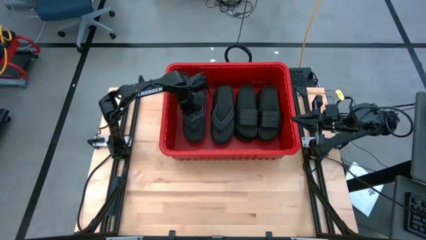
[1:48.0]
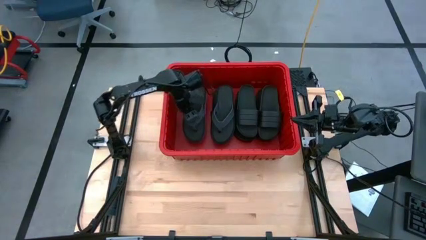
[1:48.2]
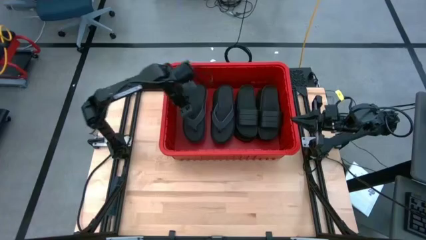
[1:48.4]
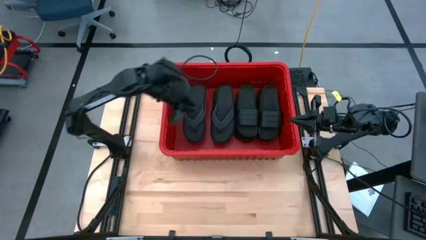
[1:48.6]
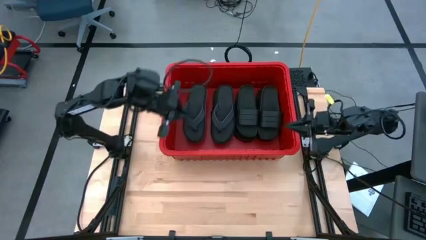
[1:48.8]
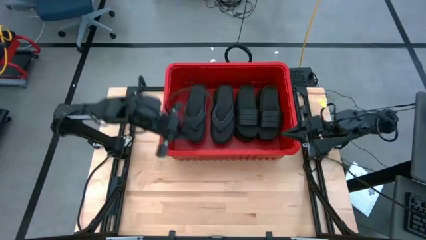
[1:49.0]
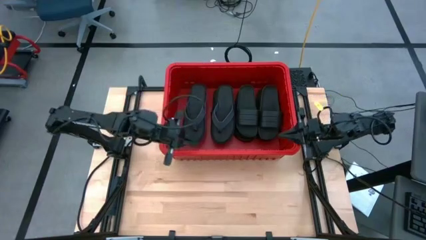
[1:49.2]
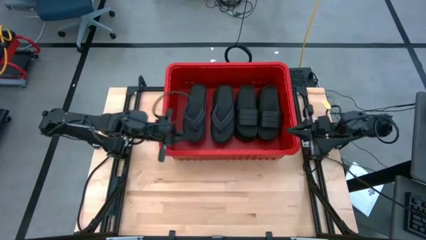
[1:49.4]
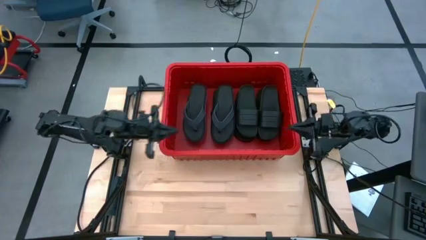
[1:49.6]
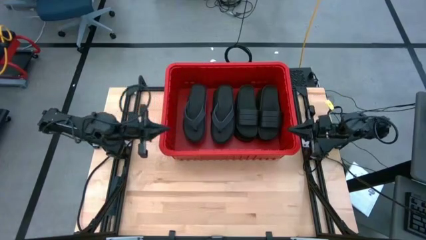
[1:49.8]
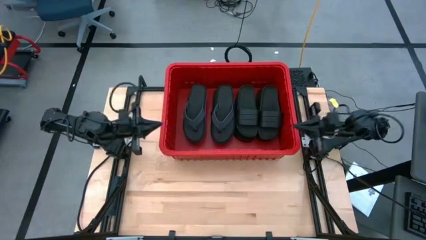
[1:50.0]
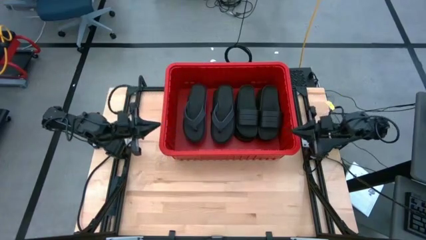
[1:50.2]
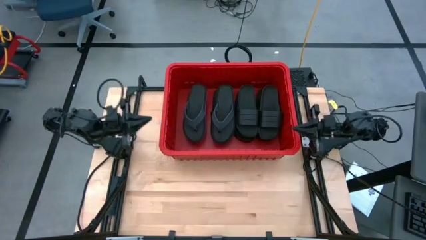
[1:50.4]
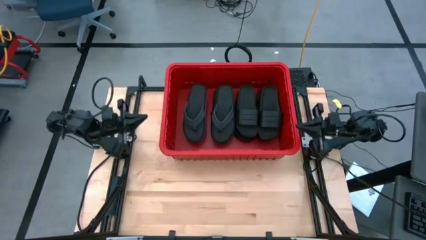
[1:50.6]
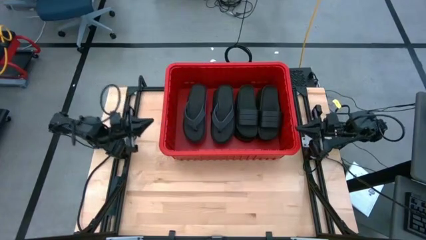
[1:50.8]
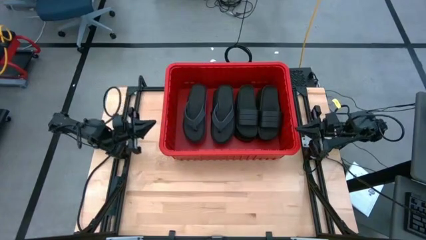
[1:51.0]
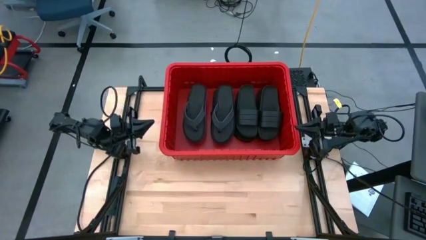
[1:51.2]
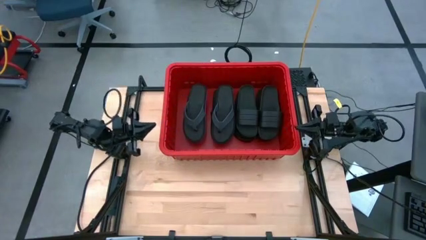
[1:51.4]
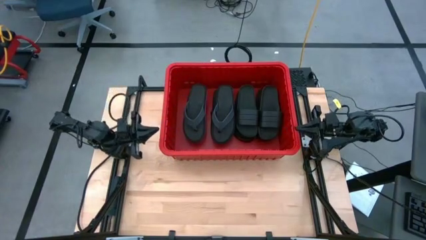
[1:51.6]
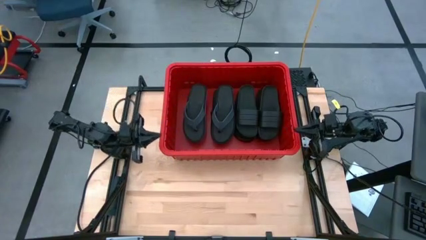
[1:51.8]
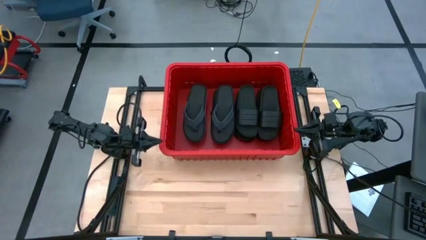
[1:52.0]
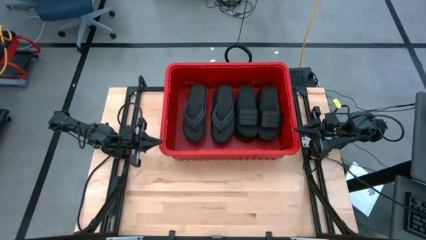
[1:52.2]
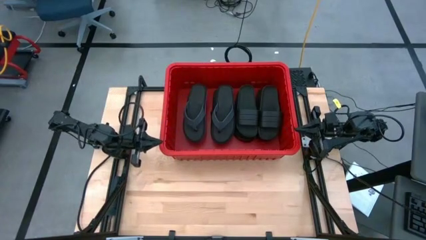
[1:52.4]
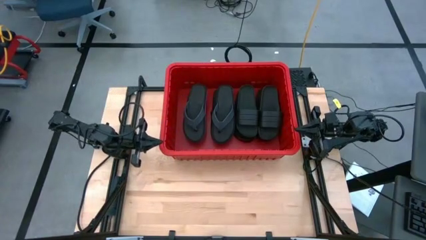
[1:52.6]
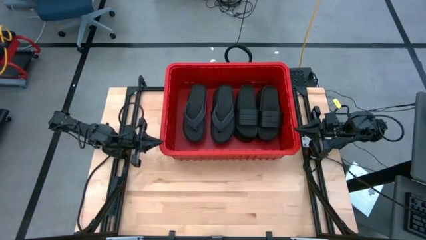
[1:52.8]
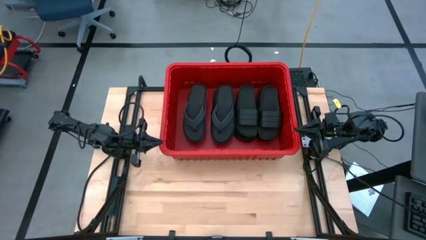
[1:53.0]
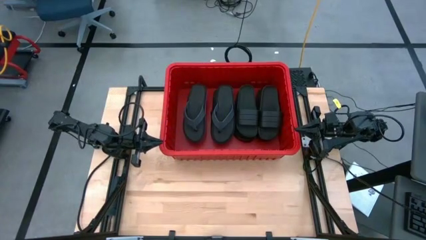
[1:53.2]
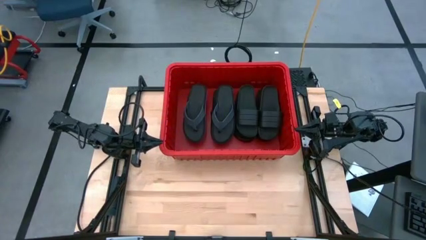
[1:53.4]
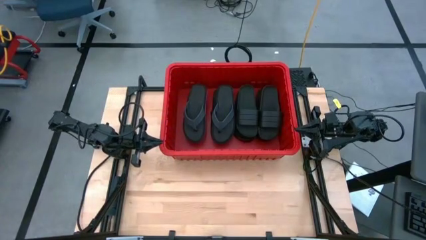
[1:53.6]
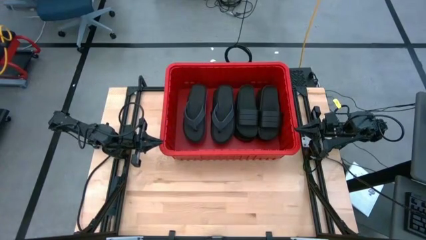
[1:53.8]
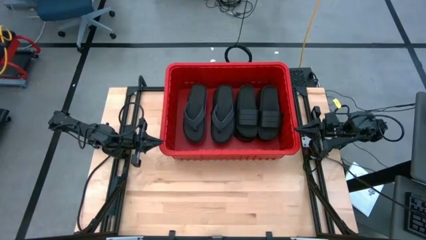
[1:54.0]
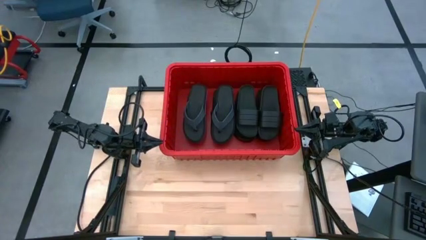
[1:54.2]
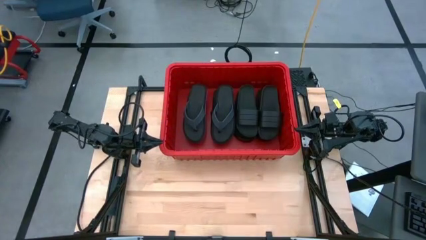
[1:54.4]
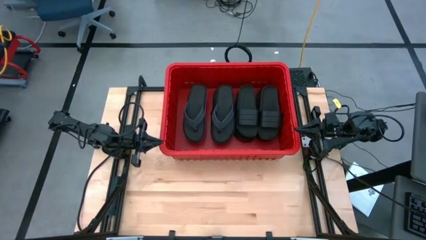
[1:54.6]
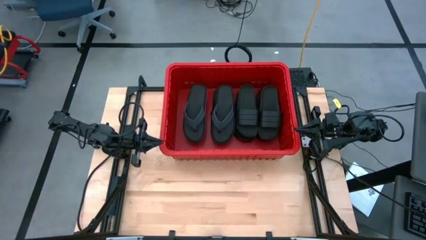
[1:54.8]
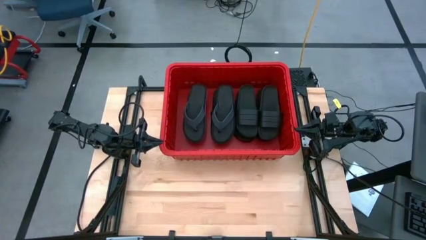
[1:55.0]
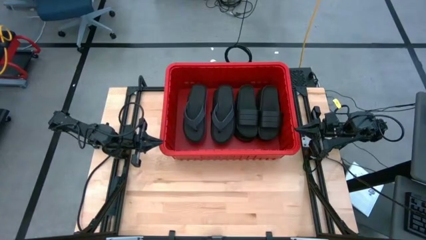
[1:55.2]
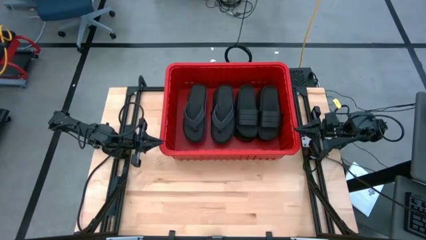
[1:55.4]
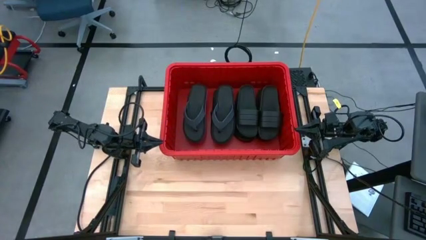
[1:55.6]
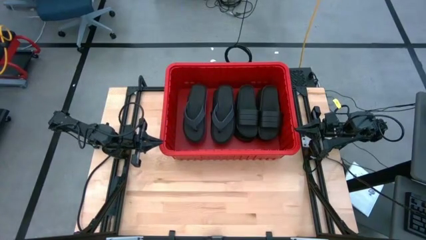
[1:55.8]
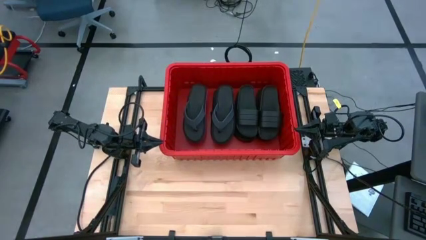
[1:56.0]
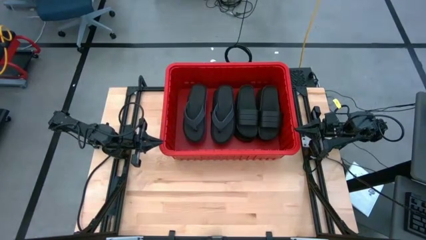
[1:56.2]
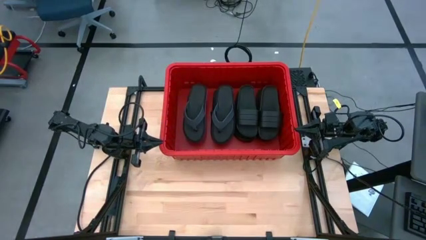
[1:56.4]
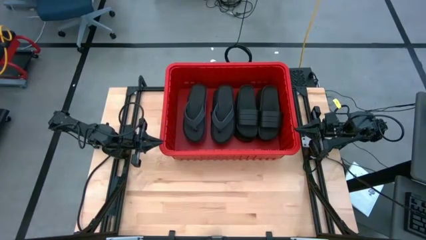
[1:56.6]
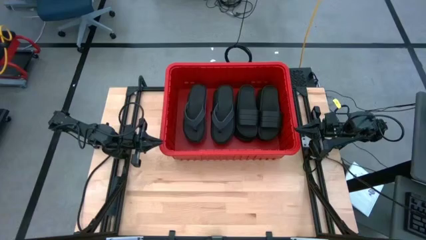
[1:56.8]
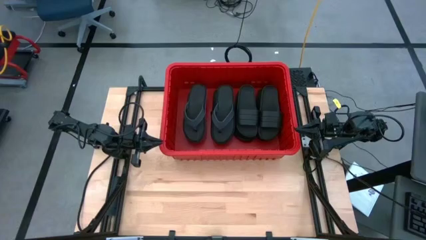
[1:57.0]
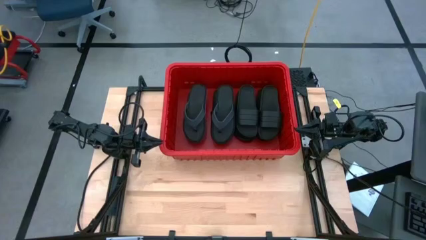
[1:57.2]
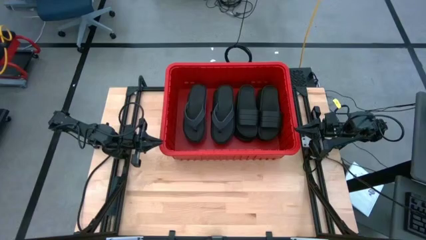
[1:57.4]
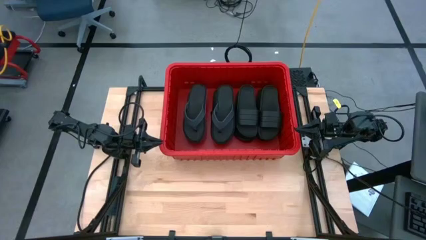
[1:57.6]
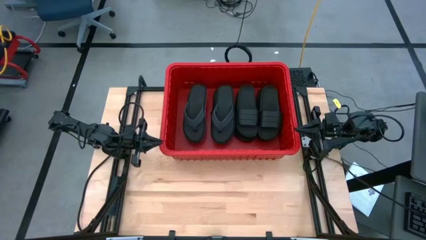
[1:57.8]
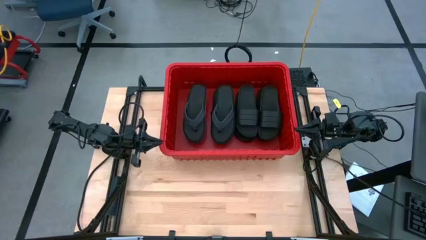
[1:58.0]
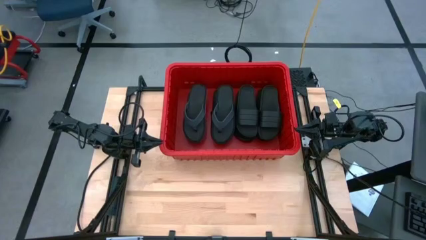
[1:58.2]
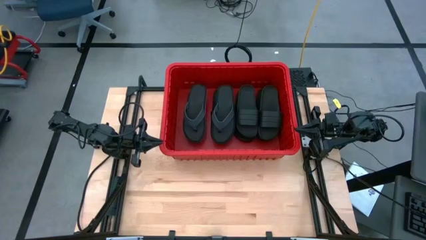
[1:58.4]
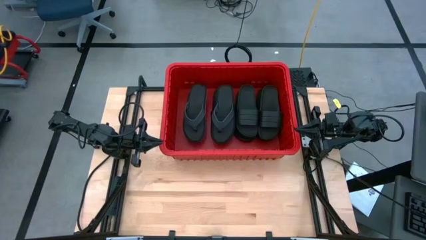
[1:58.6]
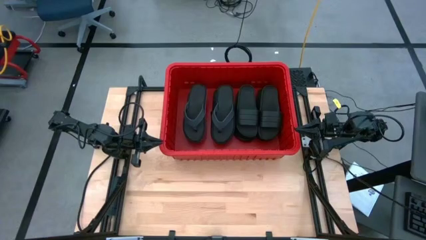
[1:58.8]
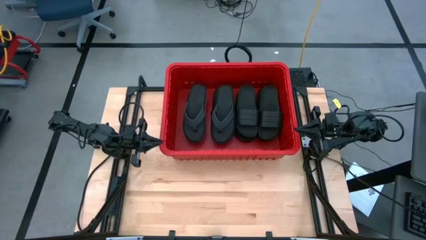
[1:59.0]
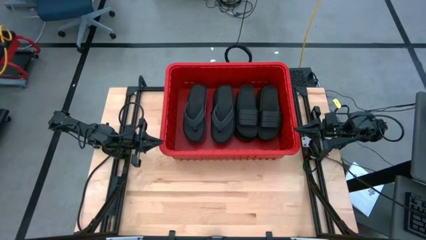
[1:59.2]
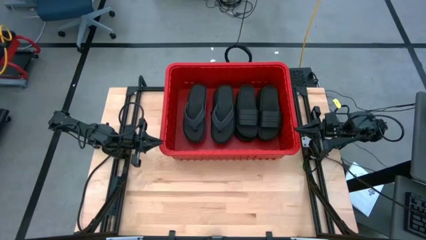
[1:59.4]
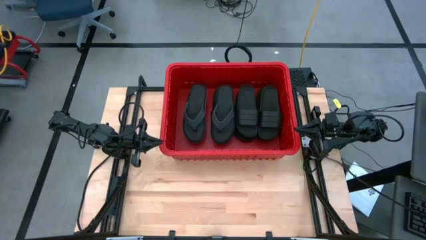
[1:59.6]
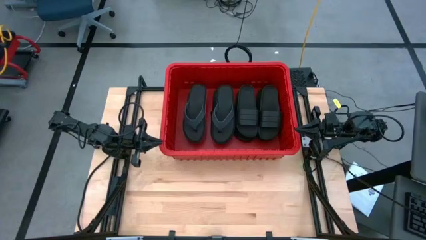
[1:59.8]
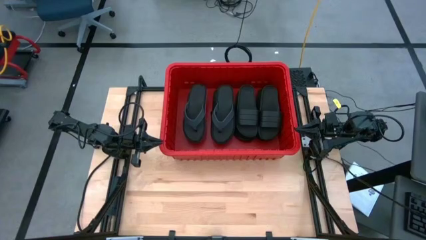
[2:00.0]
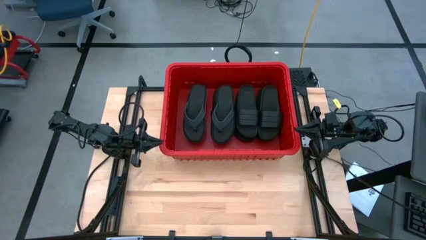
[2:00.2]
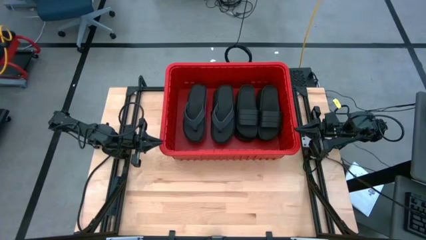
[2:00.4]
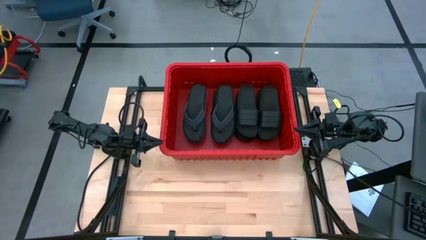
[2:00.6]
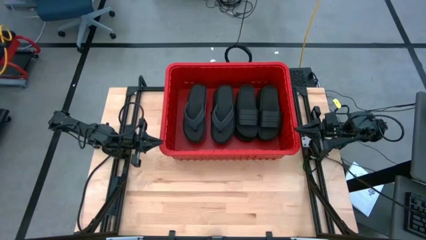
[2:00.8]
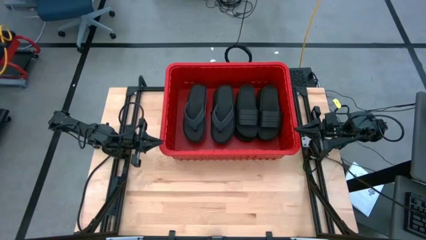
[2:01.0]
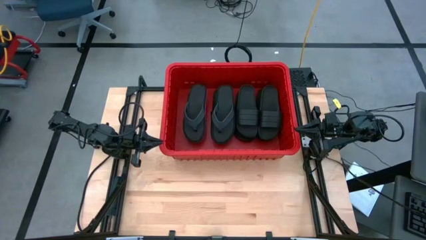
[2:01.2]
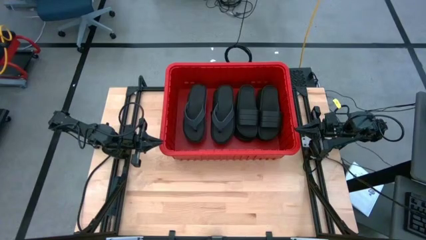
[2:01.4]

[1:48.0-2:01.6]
Task: Pick and place slides into bin
Return to Home Position
